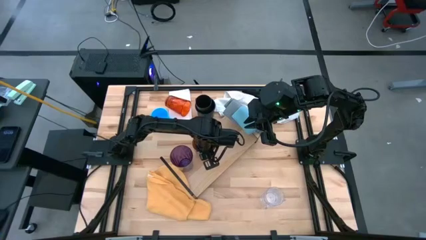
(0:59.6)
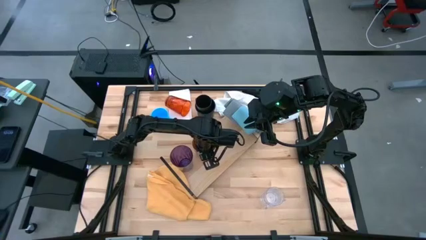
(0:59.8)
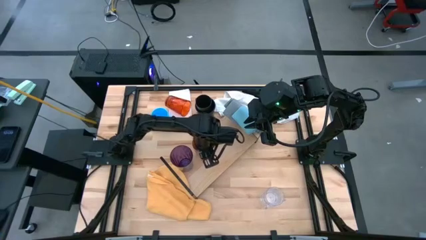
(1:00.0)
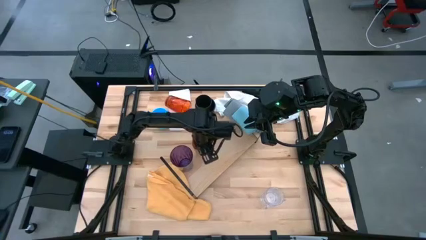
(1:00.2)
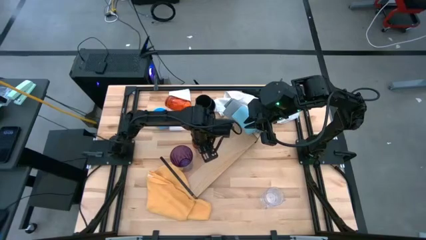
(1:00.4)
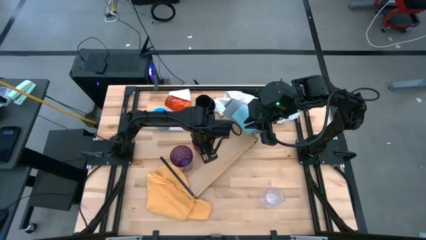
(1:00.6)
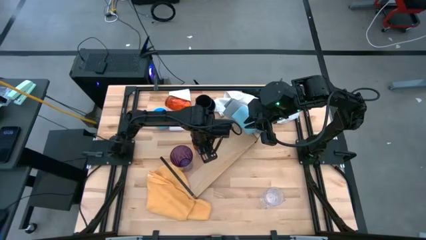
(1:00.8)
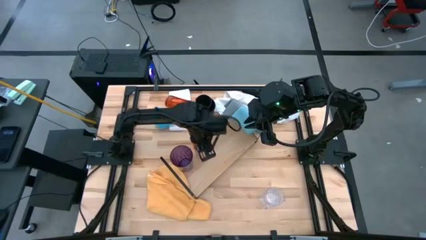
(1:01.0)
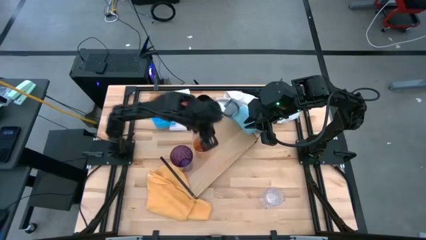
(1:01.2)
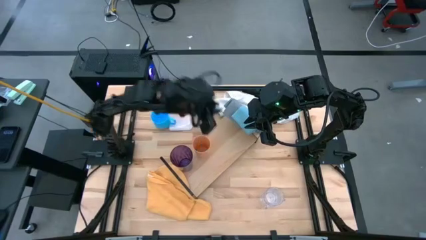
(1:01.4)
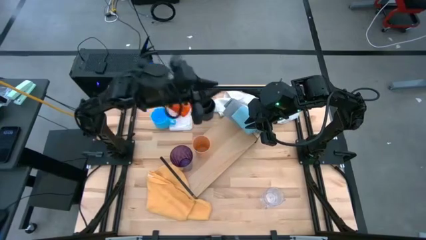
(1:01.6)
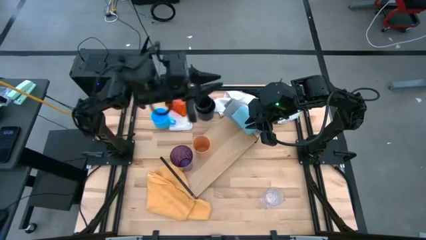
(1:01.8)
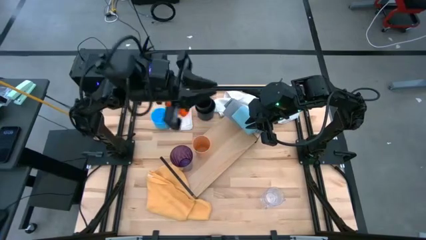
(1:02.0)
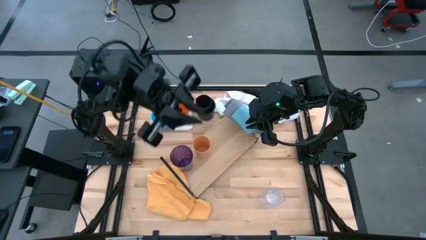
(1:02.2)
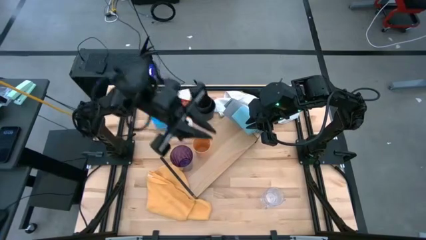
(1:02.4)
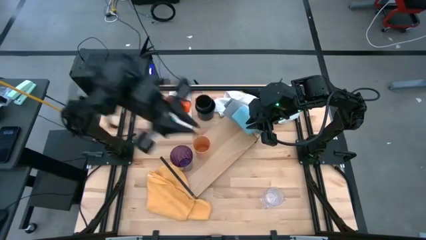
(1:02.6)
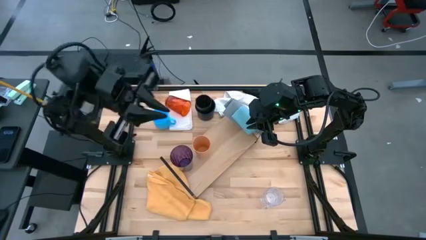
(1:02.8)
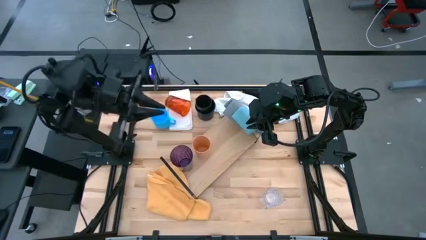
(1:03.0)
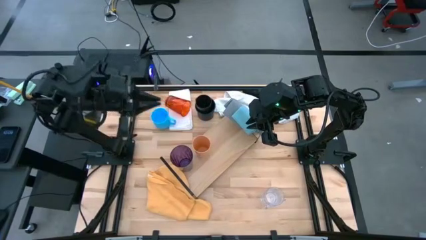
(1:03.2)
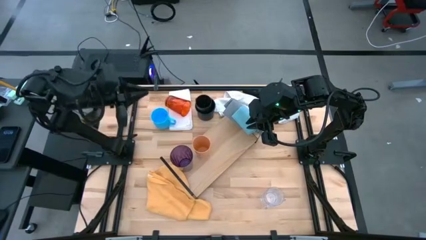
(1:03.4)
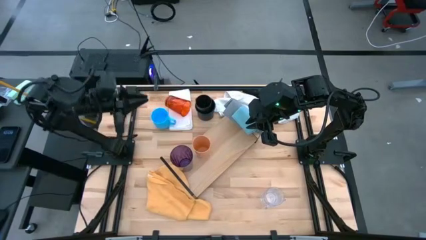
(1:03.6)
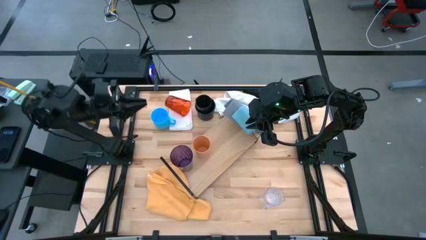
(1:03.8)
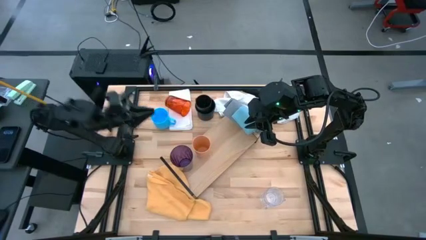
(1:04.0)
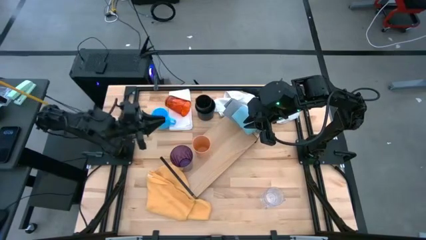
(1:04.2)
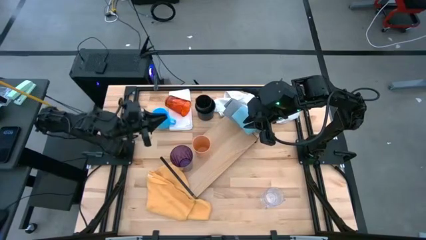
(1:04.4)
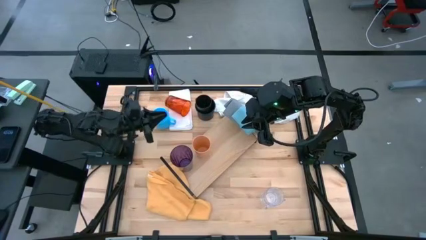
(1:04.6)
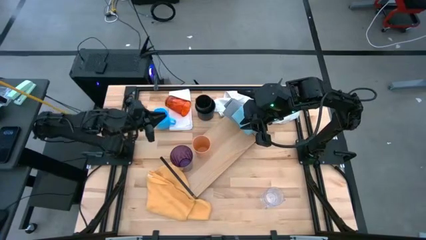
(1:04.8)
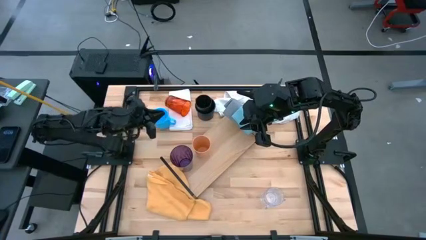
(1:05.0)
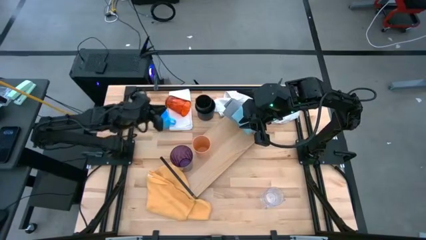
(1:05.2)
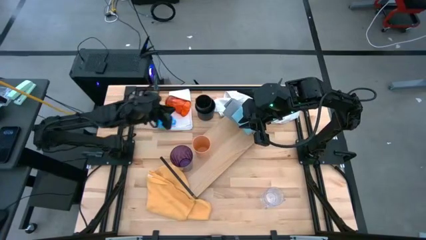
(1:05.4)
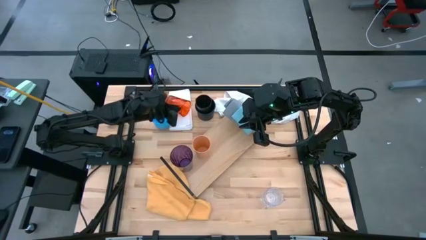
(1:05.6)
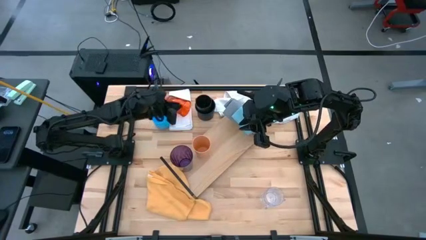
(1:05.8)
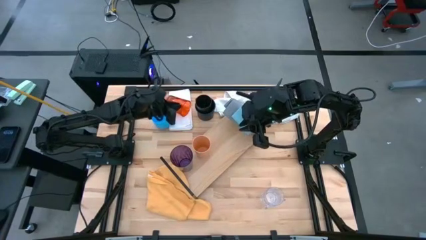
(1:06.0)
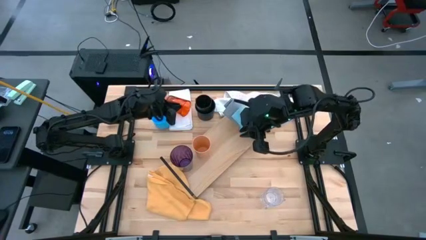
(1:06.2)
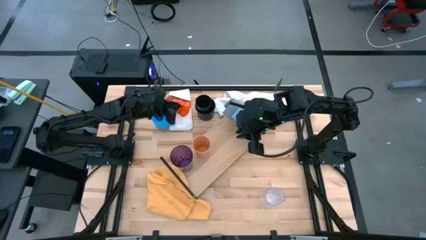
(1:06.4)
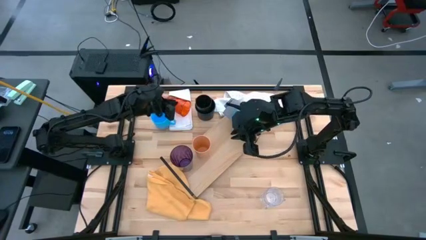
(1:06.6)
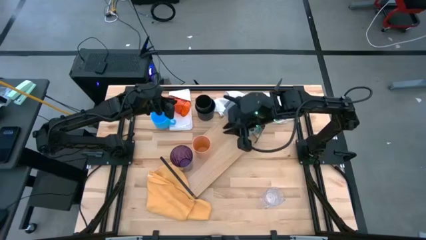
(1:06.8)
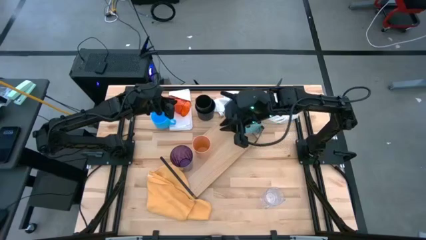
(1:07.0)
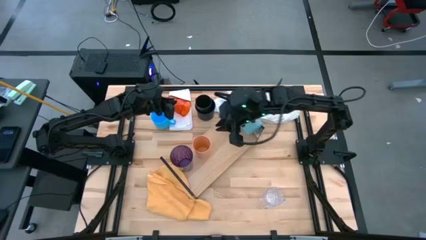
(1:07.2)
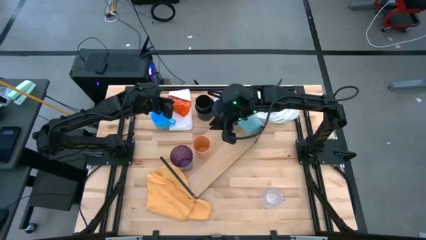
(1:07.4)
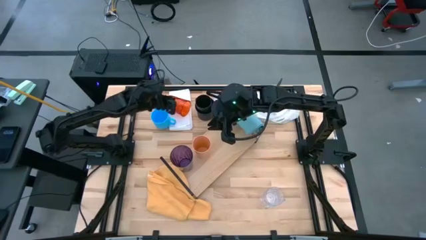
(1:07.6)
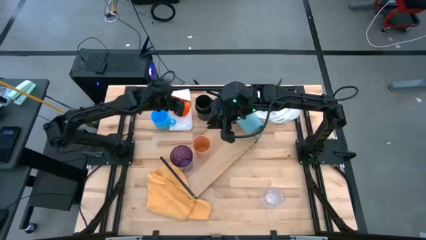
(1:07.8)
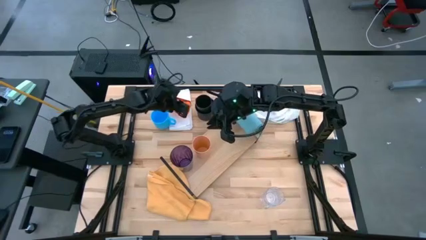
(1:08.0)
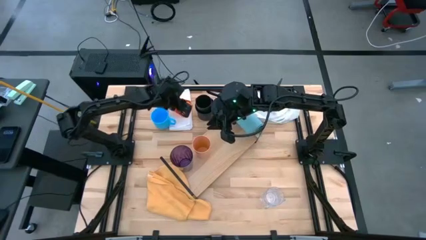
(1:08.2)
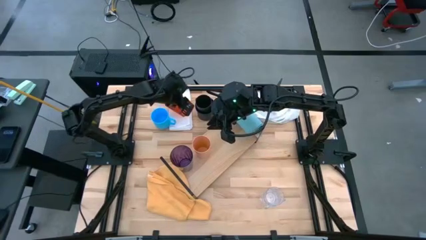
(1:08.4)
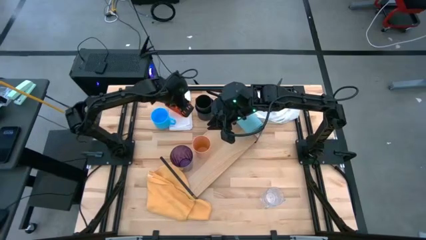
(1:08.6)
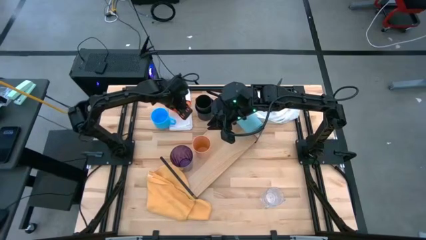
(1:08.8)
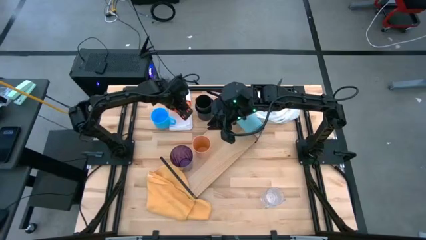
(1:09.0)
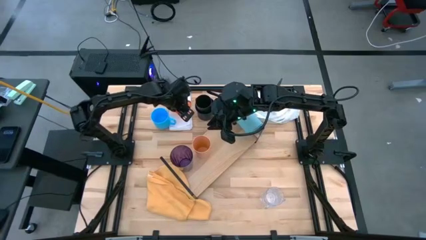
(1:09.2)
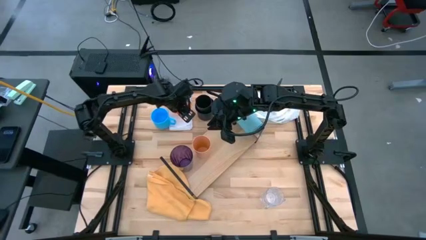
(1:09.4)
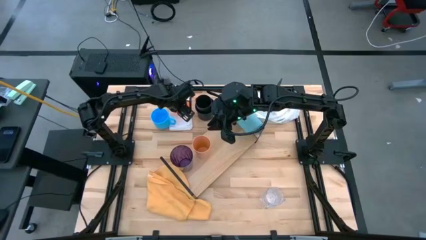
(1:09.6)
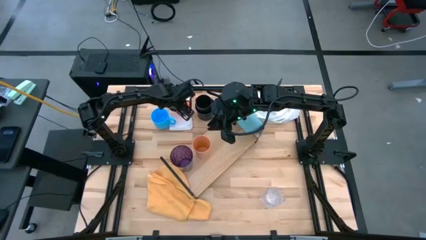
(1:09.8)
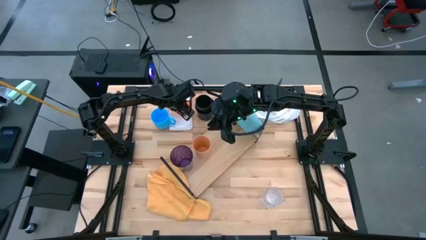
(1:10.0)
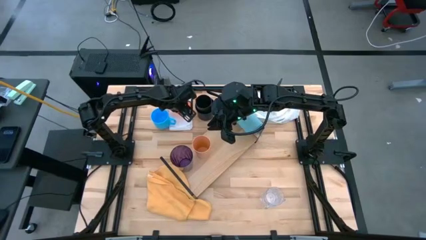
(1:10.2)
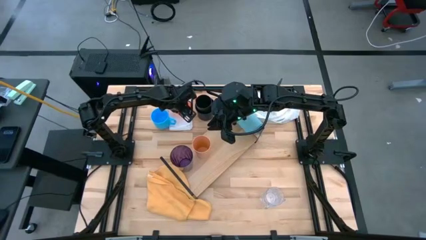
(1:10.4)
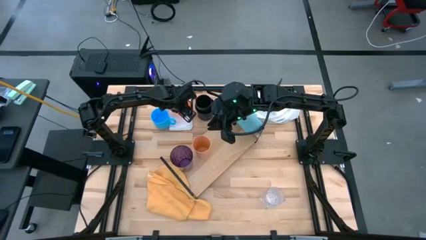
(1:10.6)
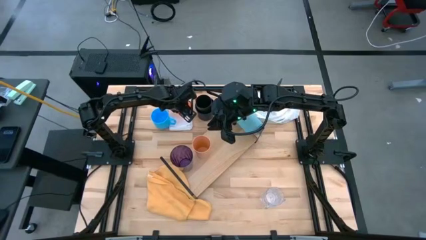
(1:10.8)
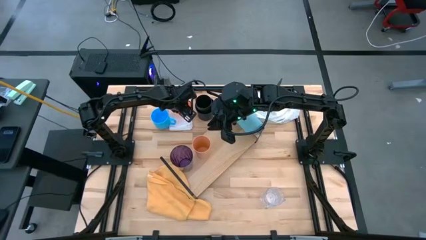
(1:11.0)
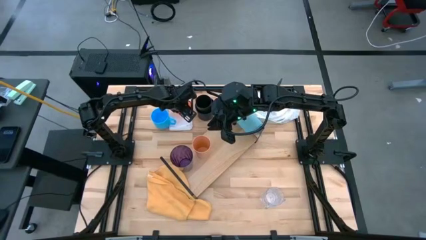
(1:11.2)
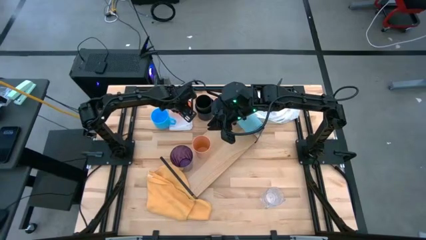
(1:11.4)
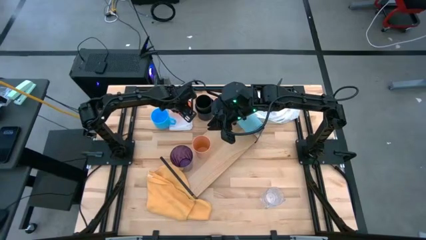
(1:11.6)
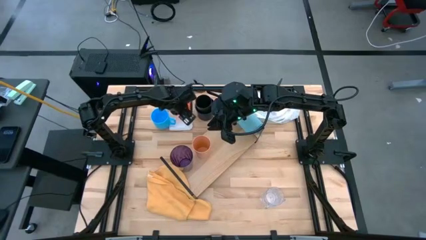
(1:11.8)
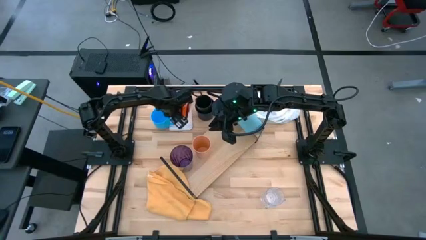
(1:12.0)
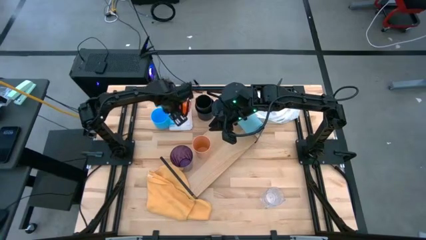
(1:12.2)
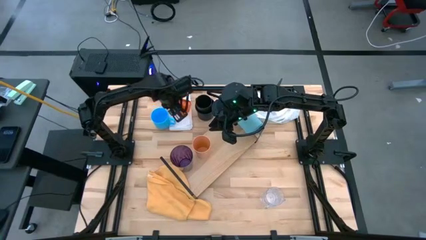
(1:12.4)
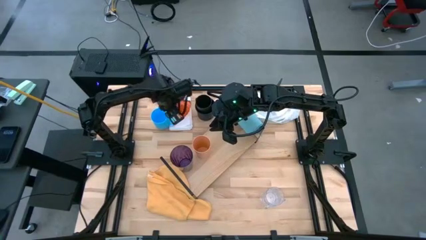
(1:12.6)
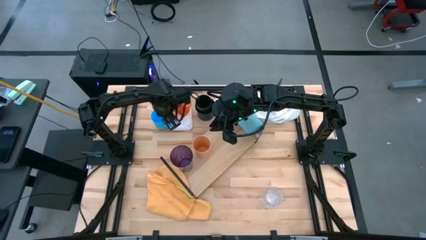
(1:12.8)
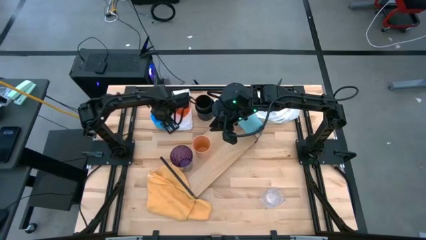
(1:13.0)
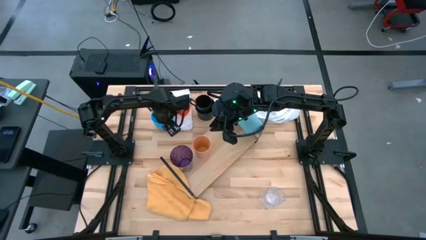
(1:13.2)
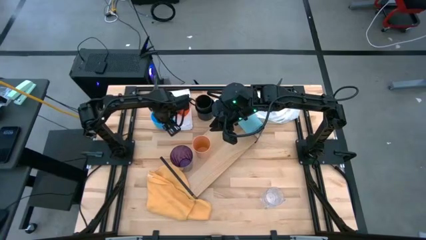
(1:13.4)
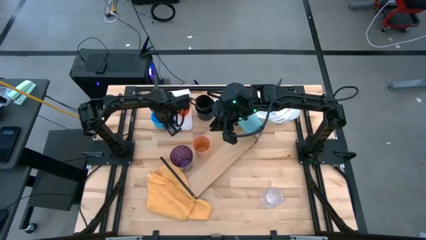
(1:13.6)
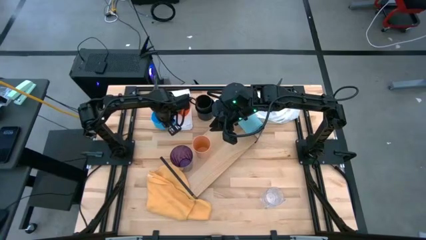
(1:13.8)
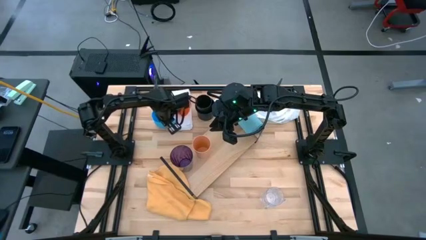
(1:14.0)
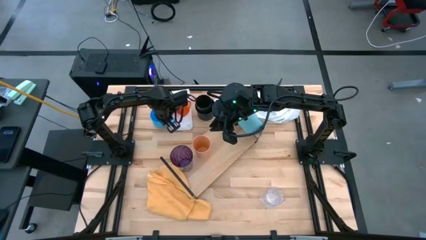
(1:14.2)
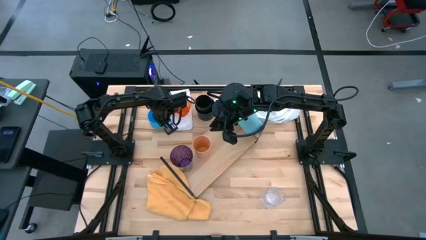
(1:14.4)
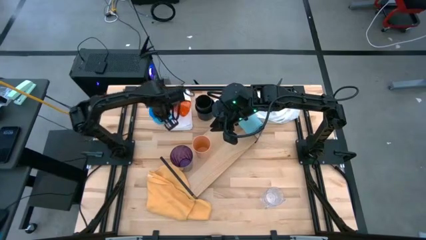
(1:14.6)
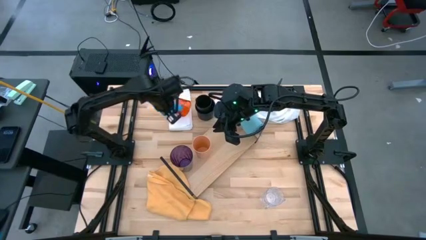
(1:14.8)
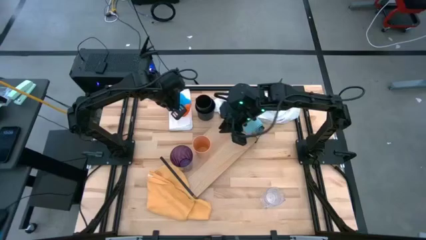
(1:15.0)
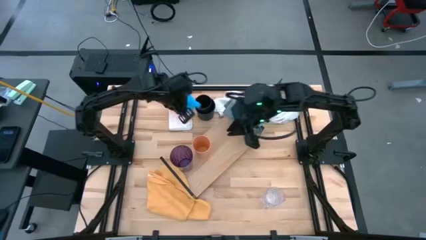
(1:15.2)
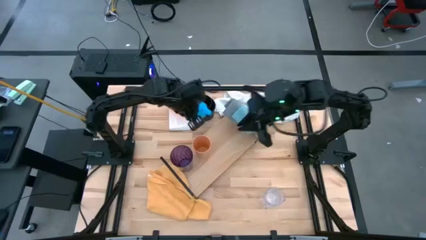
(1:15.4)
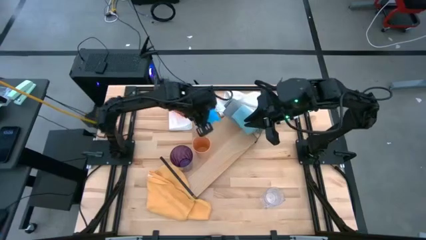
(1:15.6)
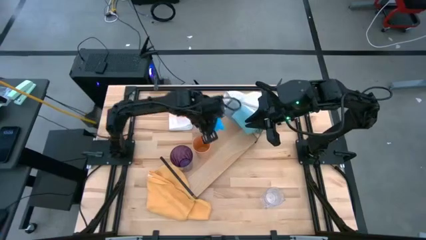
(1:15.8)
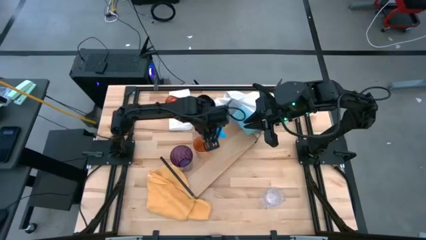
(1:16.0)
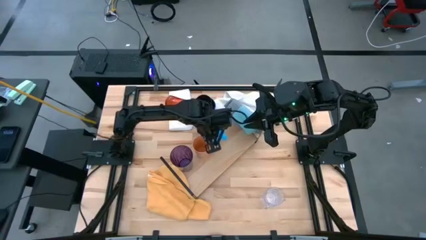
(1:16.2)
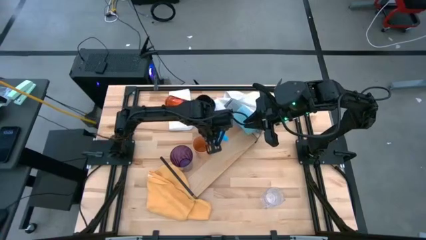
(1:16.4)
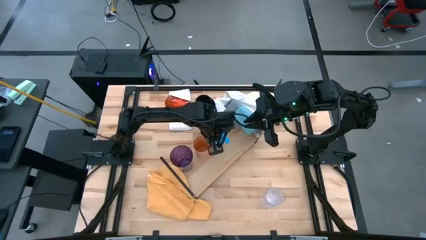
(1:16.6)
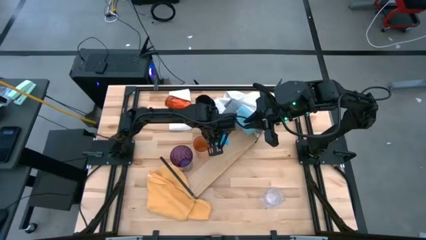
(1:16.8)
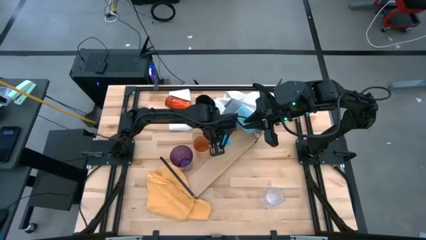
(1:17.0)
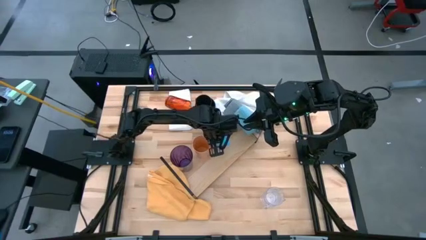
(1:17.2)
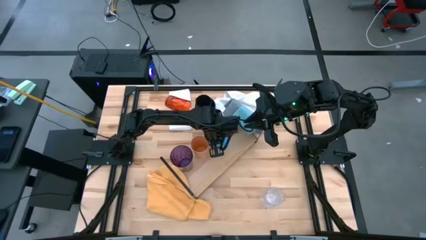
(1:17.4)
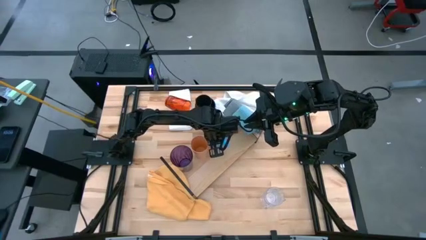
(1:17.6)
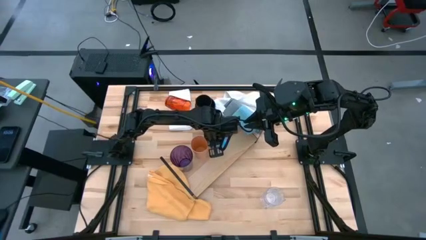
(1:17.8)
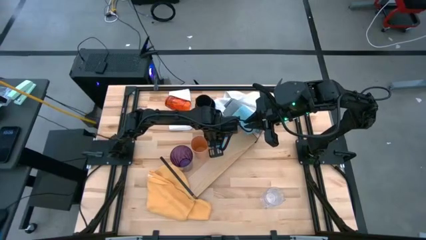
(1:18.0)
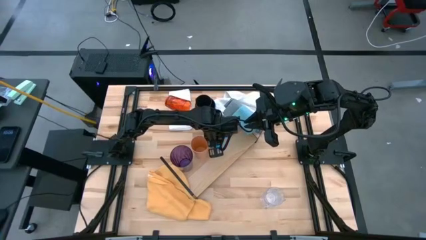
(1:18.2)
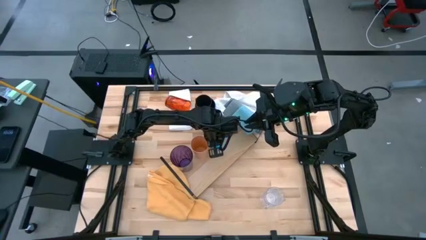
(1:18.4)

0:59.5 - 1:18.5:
Task: Stack small to large cups/mugs on shelf
Put the blue mug on the shelf
